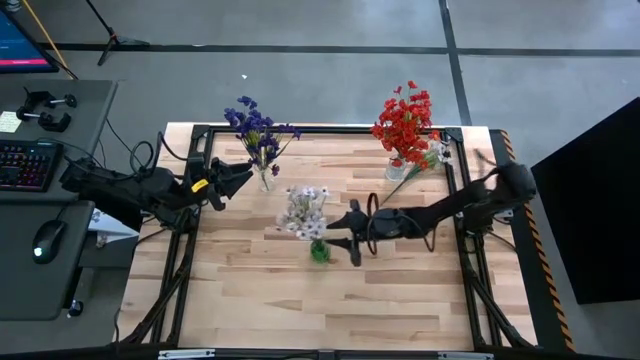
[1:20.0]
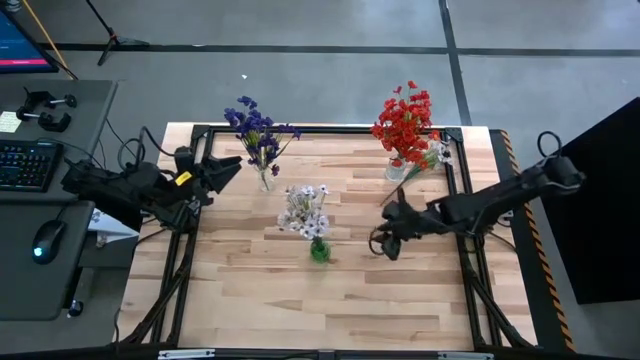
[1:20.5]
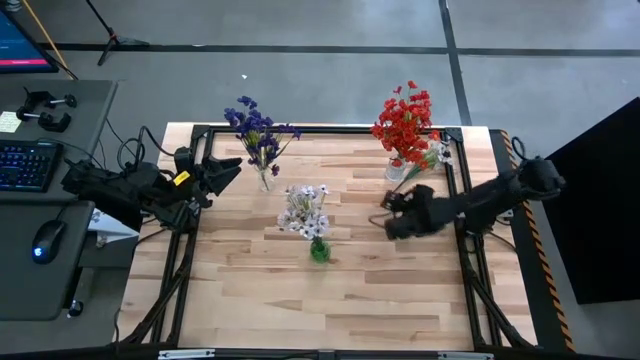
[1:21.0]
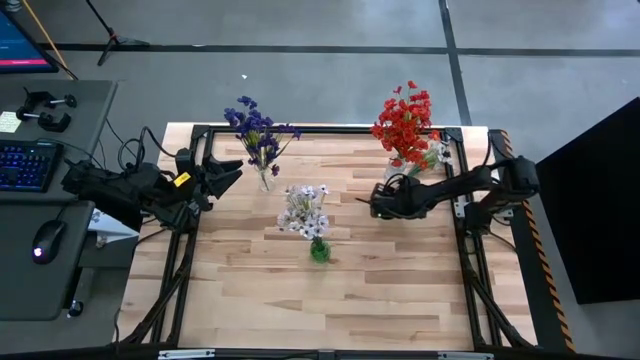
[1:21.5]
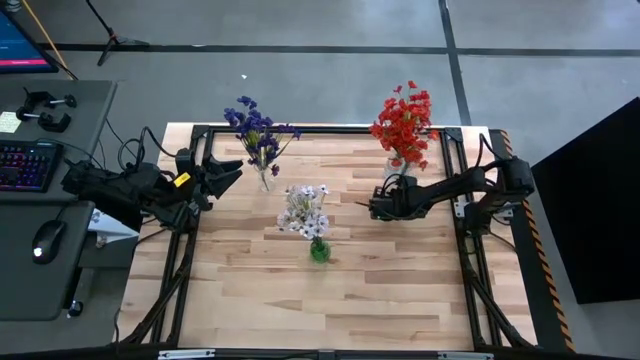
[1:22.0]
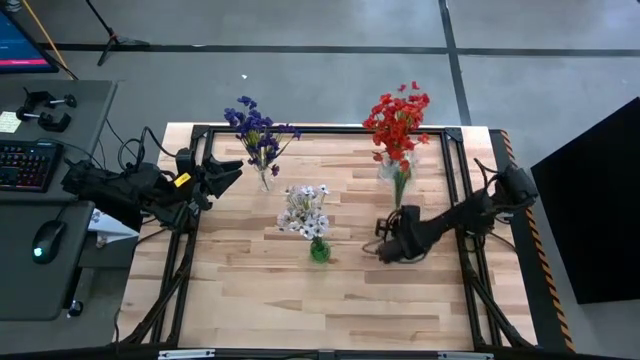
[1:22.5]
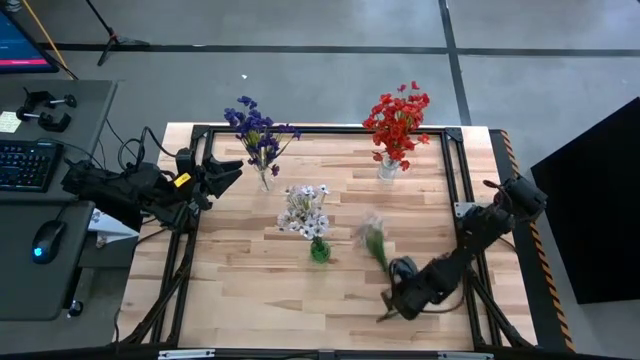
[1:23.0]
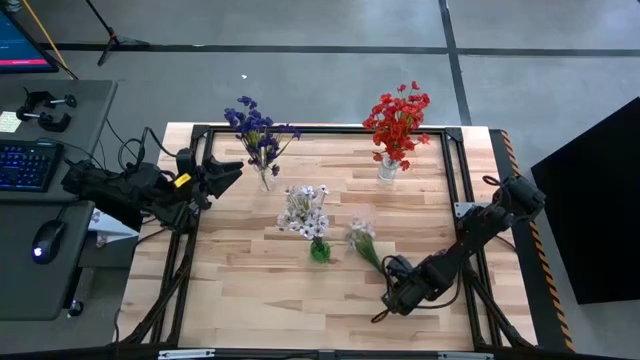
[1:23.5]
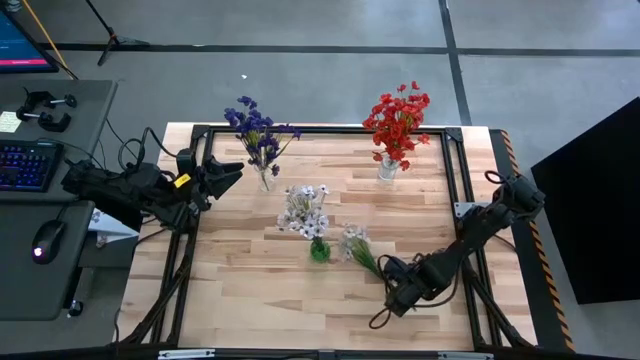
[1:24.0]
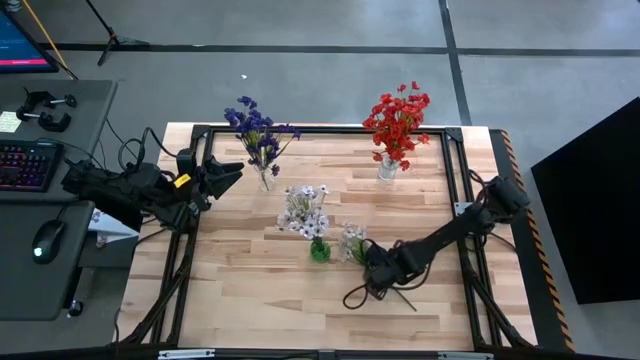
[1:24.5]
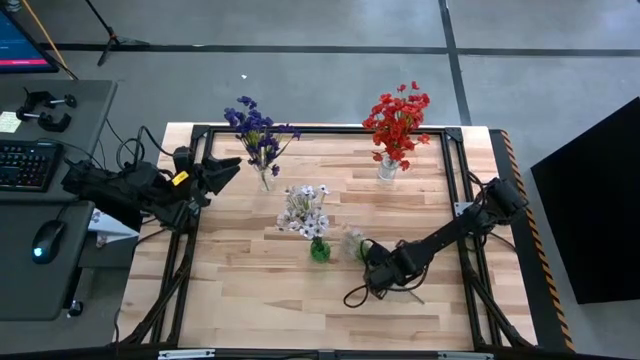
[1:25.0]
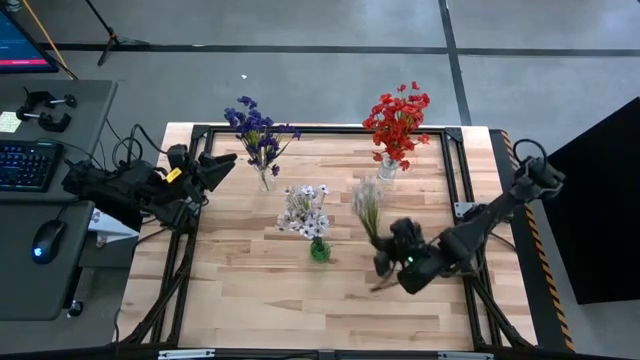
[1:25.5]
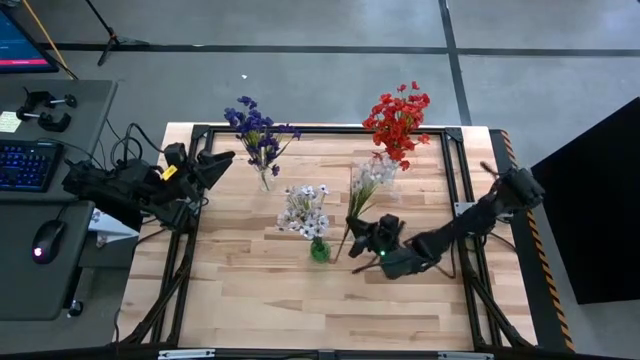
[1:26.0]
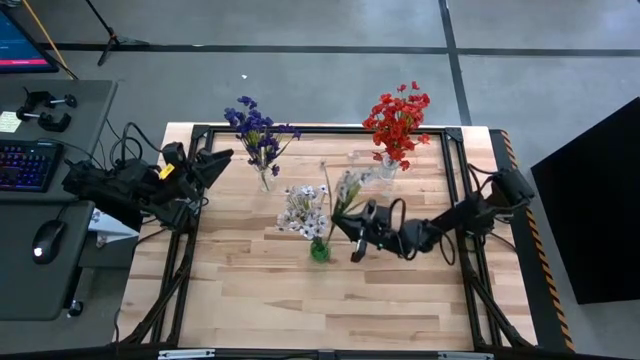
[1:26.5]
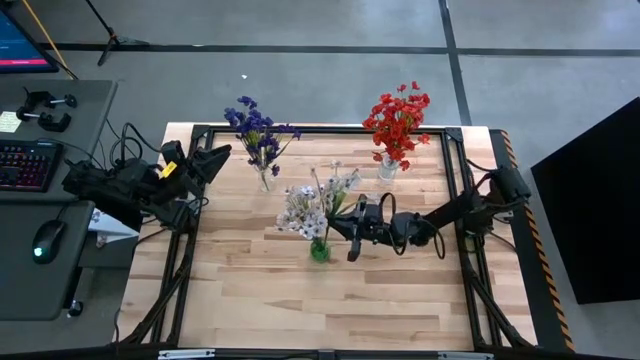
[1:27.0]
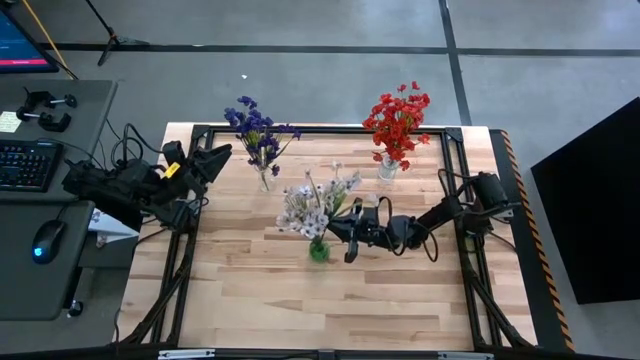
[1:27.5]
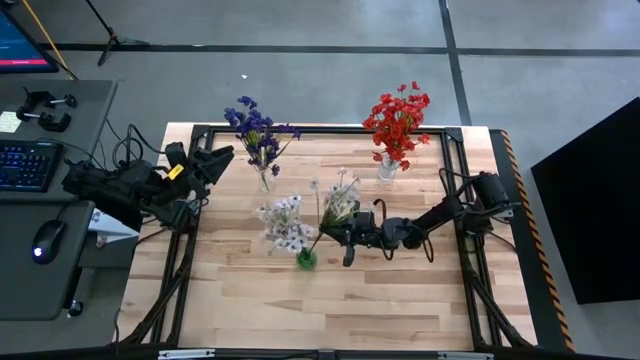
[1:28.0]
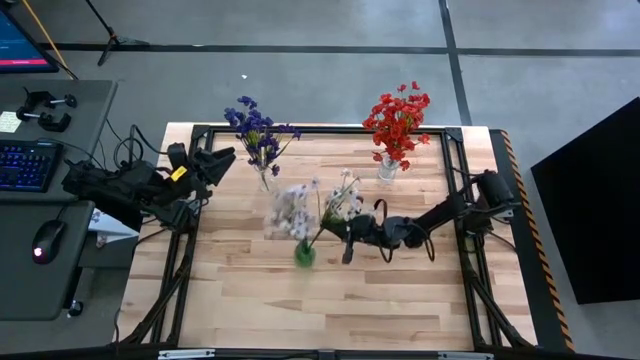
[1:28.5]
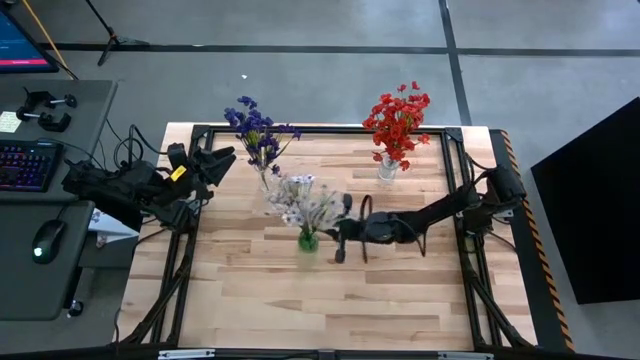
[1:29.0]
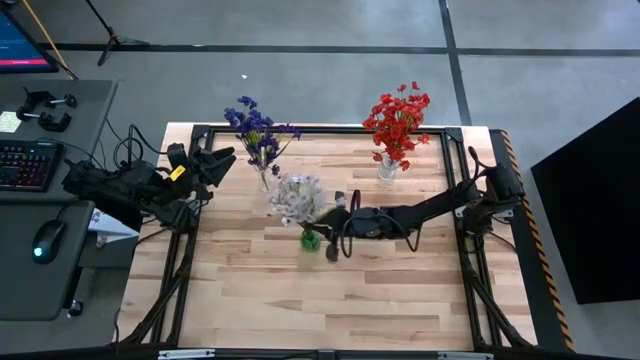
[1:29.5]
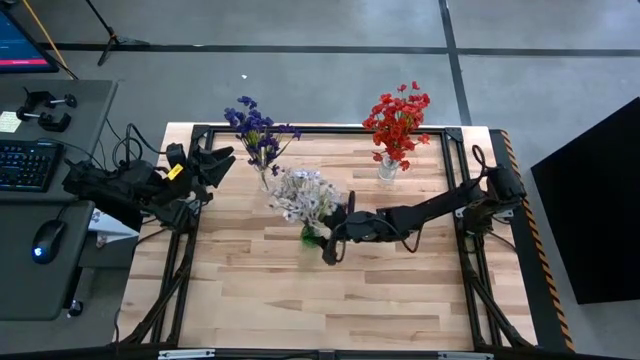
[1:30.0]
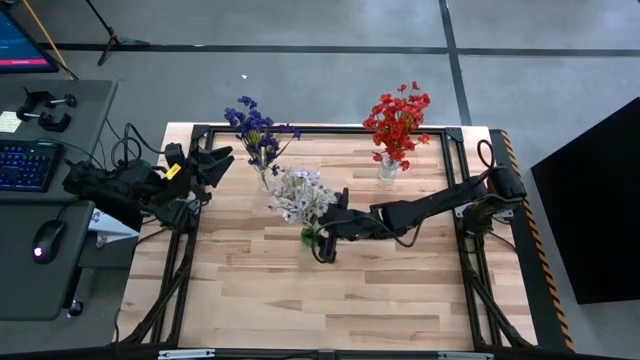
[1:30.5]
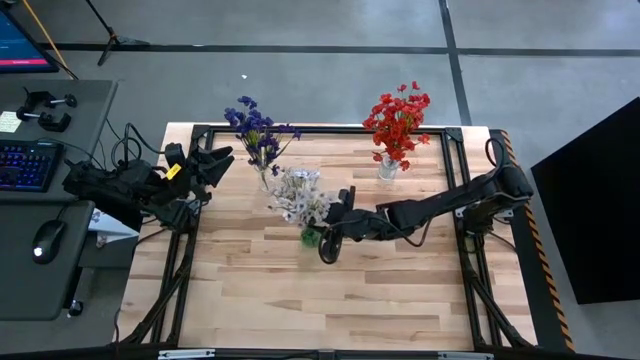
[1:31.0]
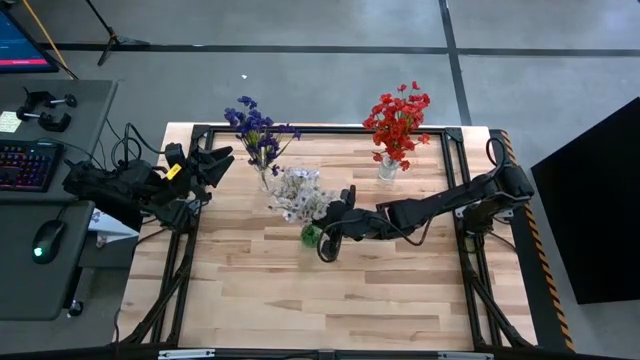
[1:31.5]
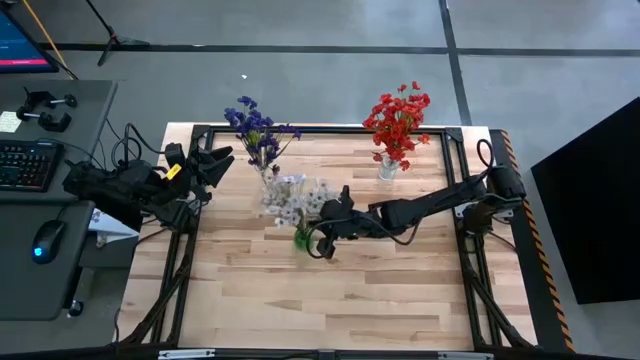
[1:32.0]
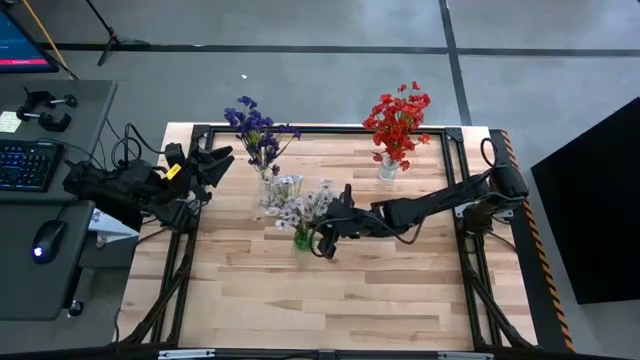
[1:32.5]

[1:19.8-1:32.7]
Task: Sort flowers into vase by color
Put the white flowers into the green flower vase

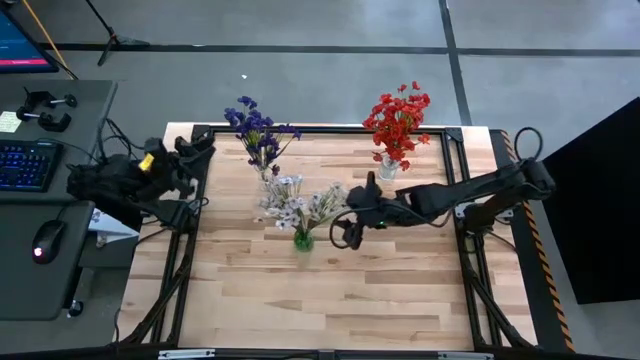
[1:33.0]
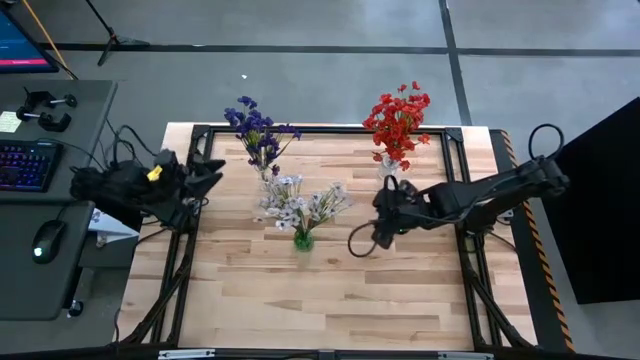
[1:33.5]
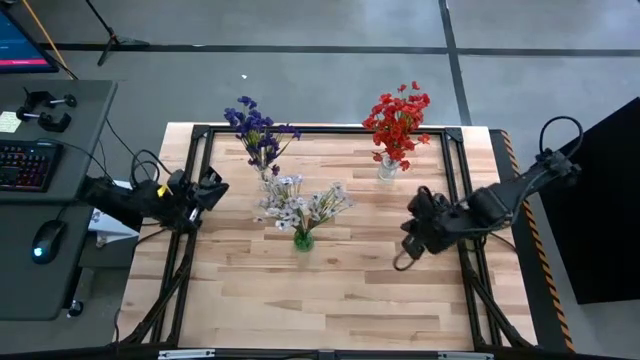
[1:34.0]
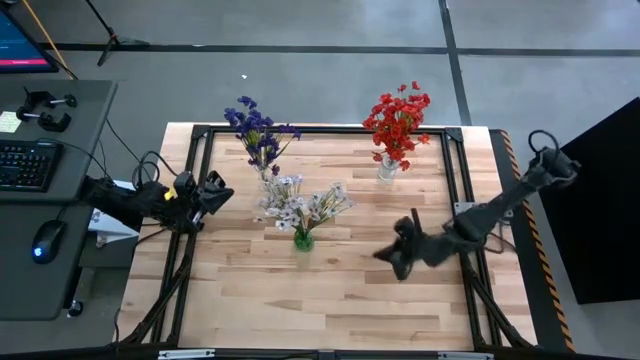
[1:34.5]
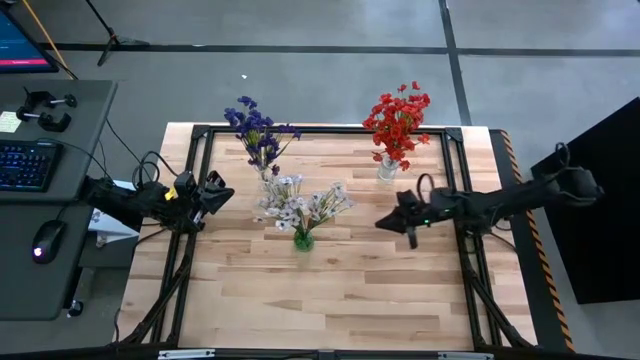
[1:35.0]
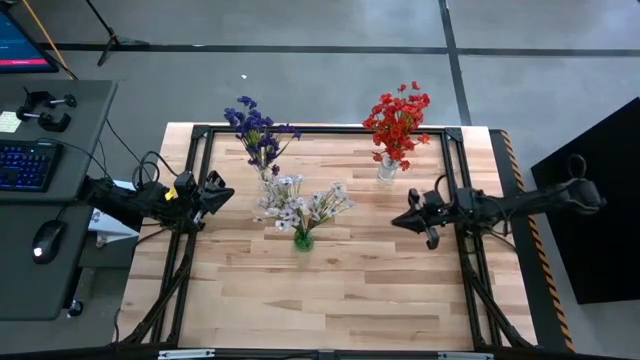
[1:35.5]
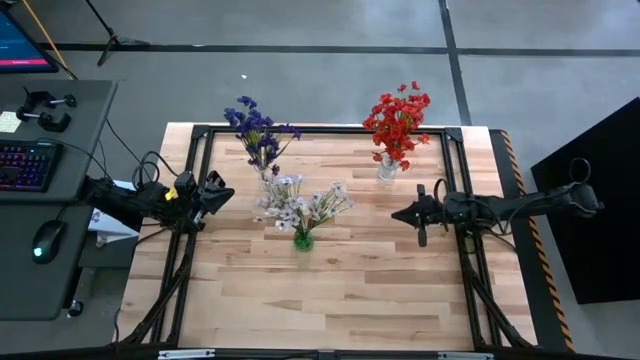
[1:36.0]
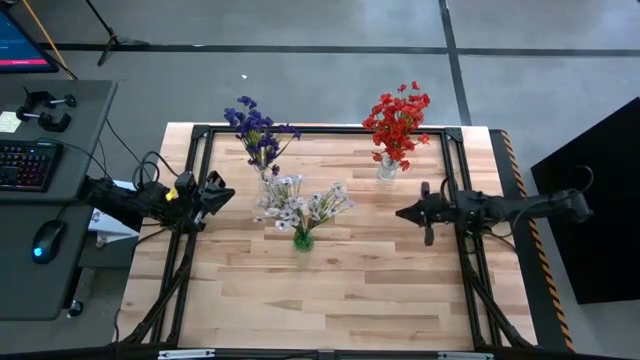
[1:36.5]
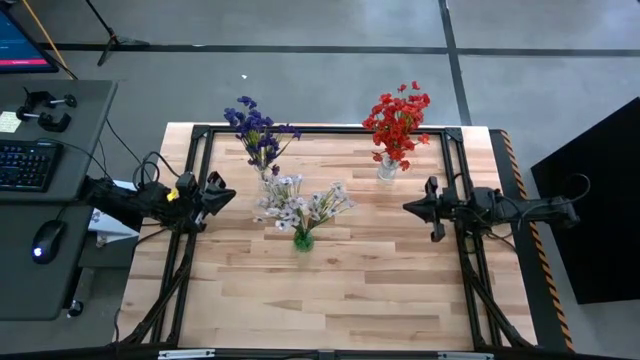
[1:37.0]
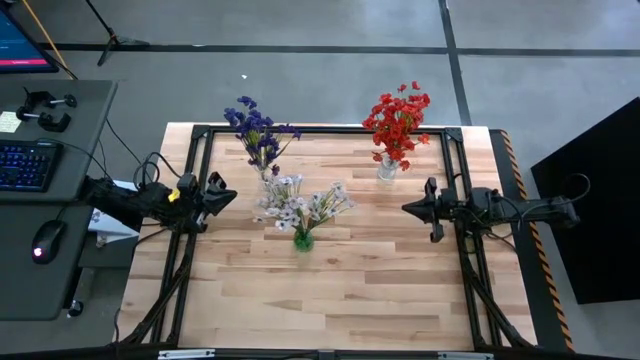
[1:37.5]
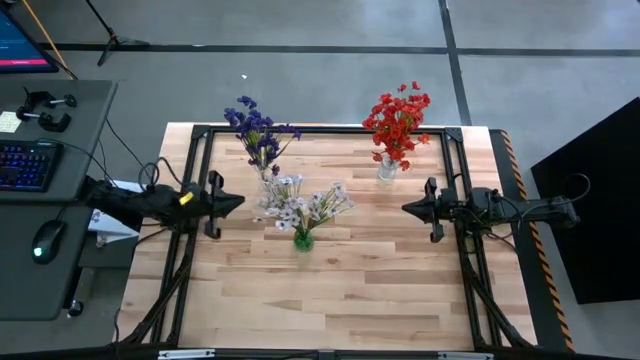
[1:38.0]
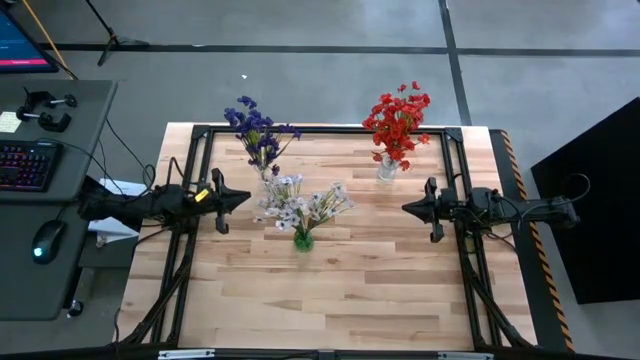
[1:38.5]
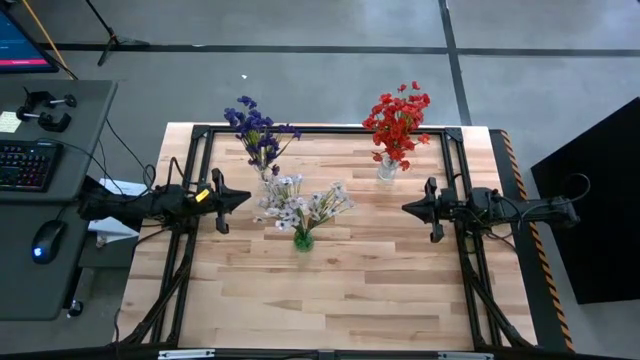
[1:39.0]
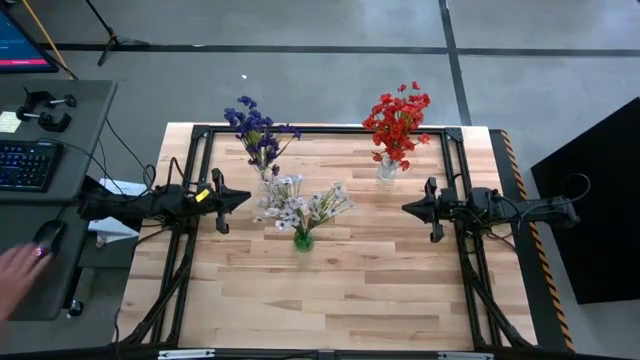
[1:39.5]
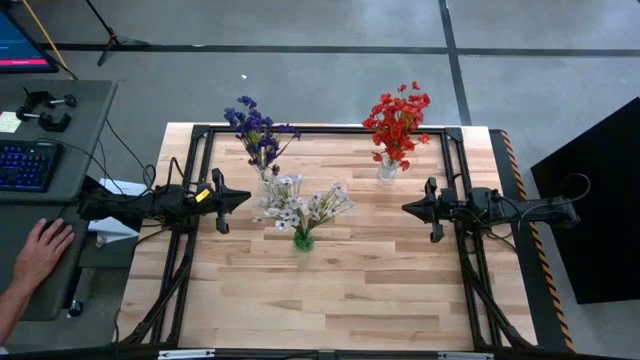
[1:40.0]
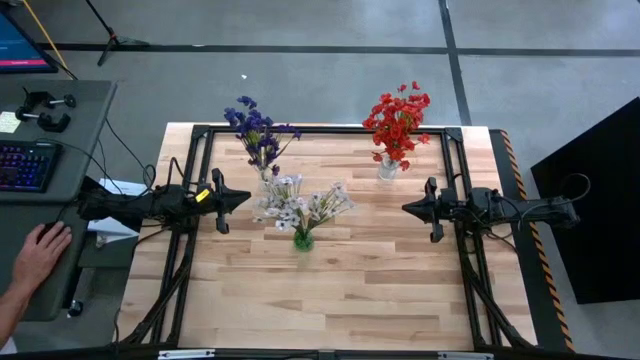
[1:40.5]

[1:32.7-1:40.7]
Return to Home Position
